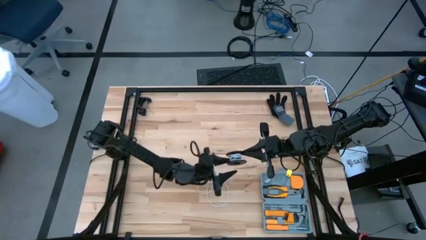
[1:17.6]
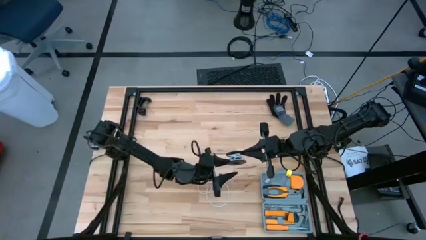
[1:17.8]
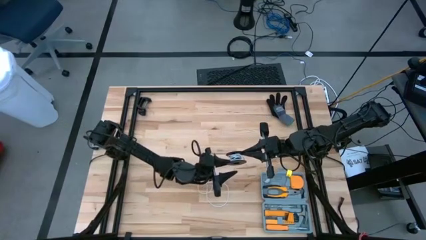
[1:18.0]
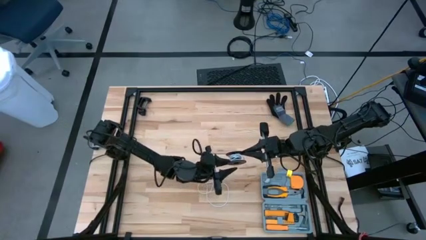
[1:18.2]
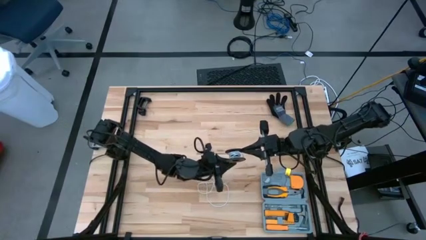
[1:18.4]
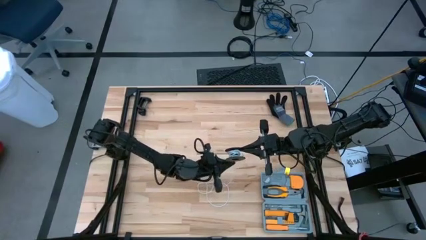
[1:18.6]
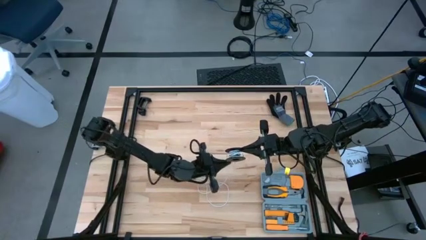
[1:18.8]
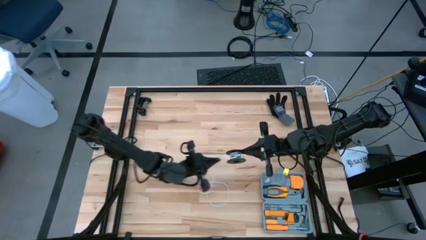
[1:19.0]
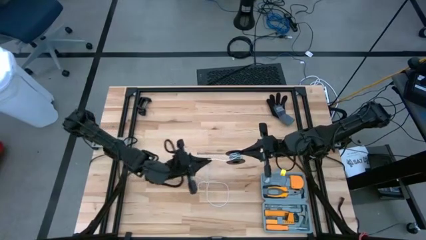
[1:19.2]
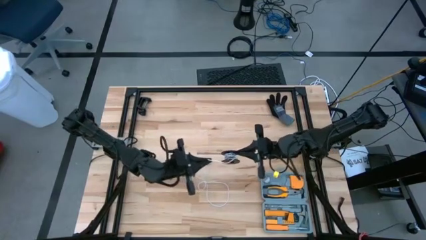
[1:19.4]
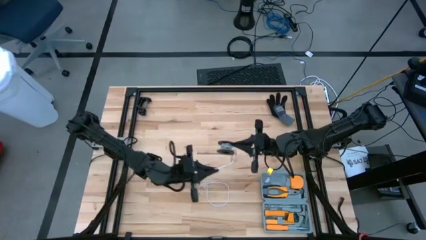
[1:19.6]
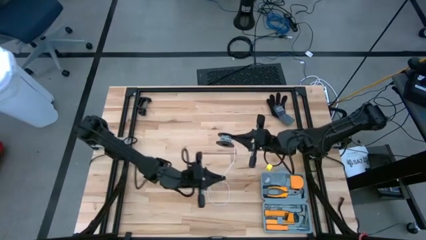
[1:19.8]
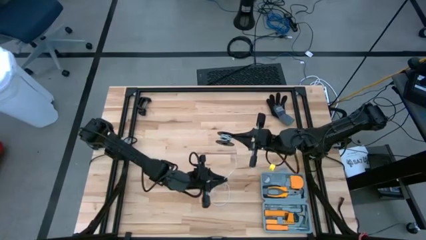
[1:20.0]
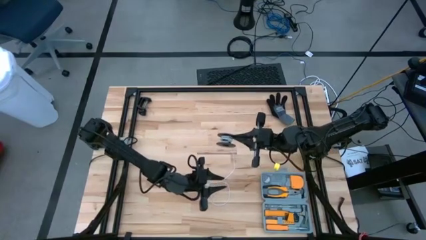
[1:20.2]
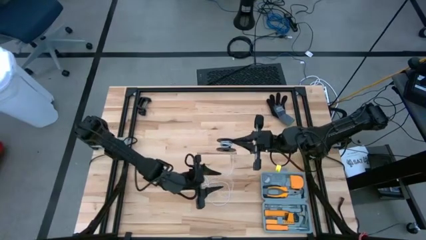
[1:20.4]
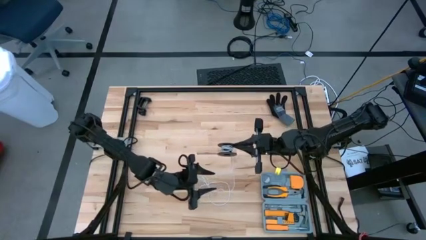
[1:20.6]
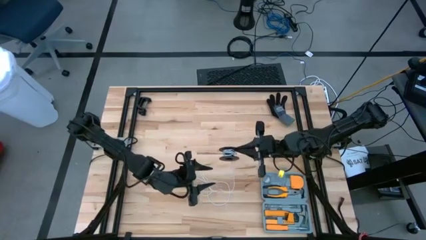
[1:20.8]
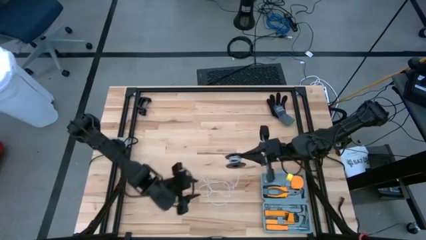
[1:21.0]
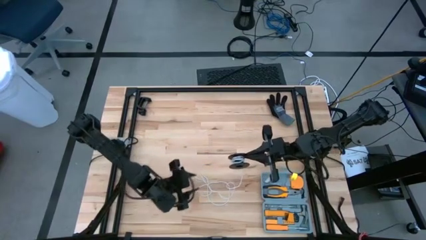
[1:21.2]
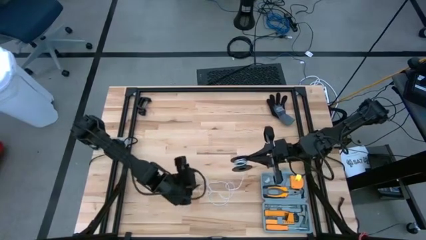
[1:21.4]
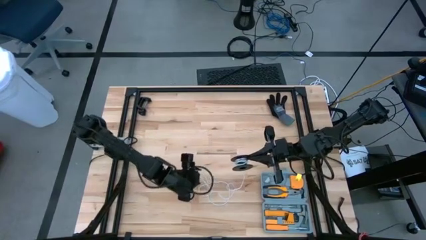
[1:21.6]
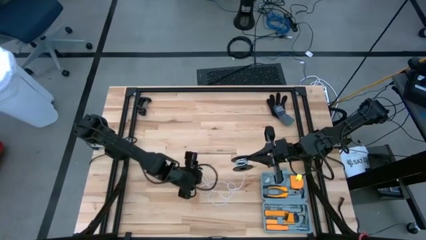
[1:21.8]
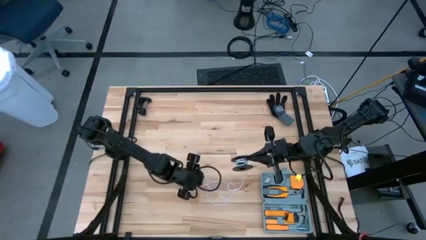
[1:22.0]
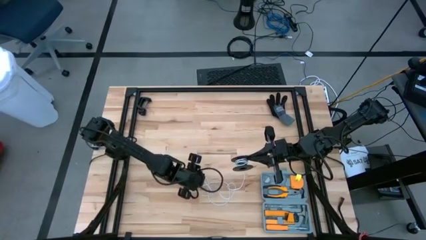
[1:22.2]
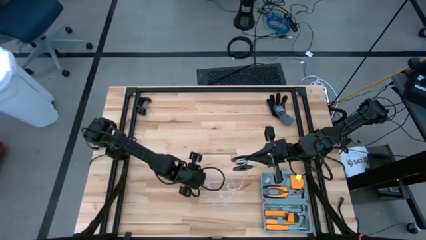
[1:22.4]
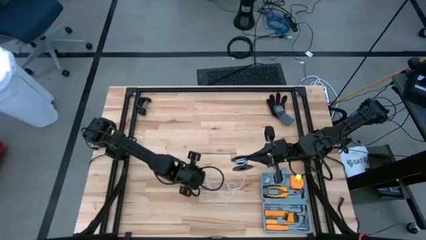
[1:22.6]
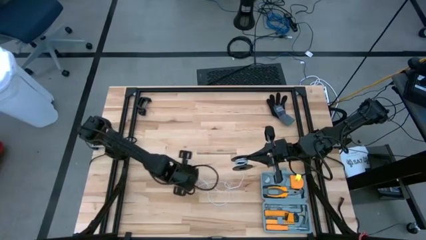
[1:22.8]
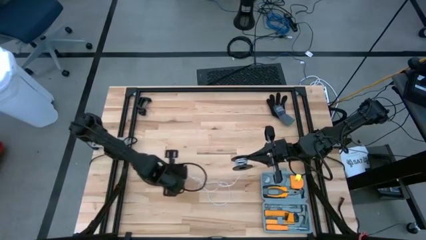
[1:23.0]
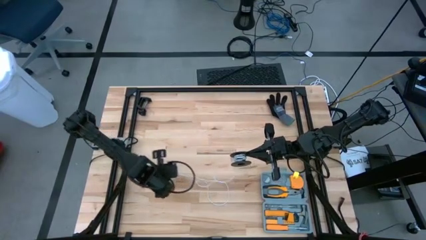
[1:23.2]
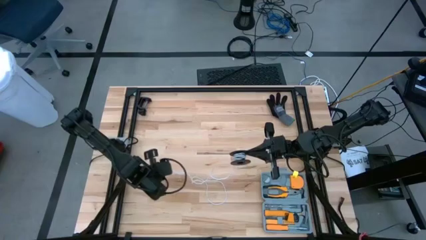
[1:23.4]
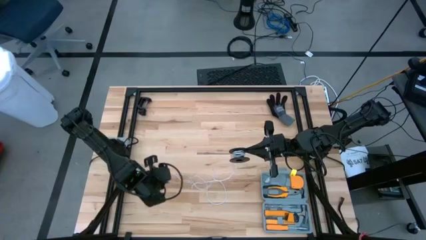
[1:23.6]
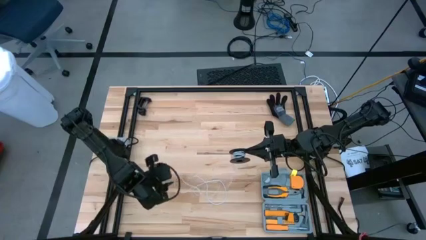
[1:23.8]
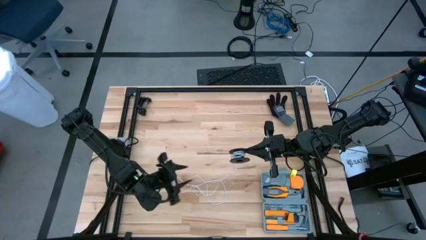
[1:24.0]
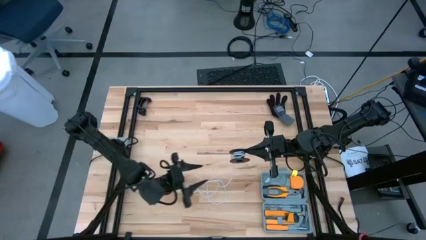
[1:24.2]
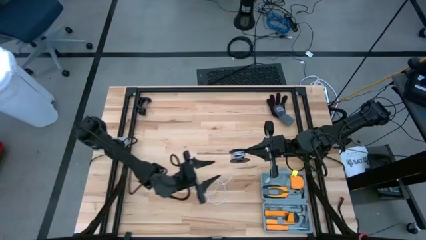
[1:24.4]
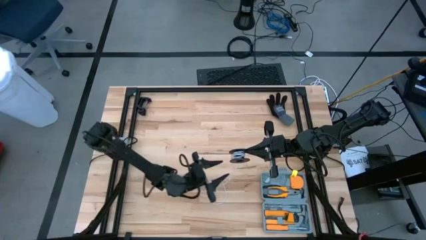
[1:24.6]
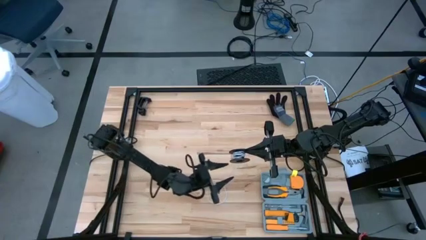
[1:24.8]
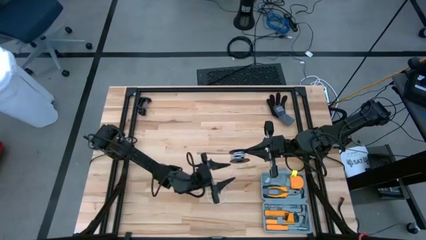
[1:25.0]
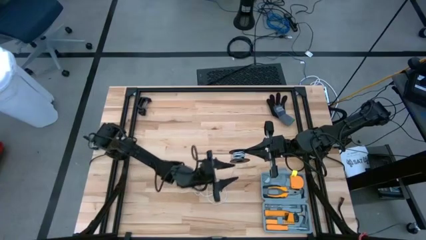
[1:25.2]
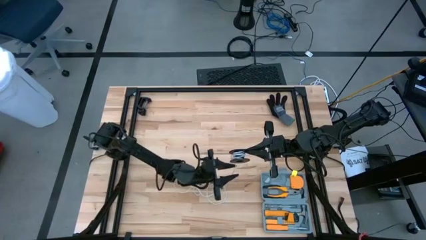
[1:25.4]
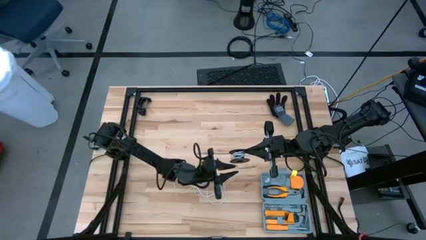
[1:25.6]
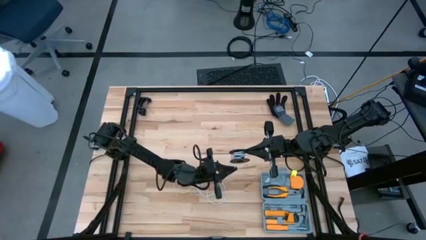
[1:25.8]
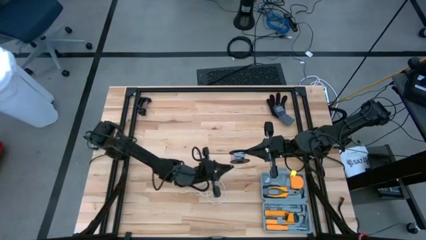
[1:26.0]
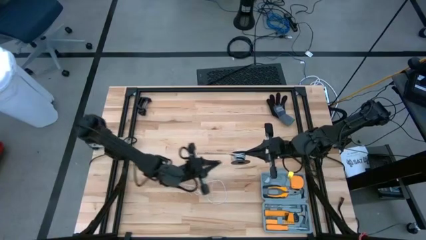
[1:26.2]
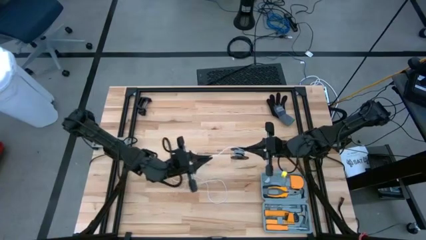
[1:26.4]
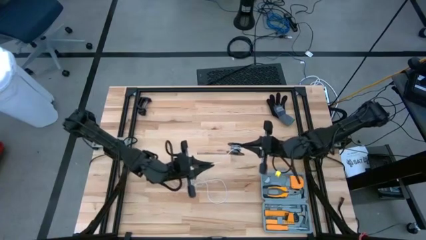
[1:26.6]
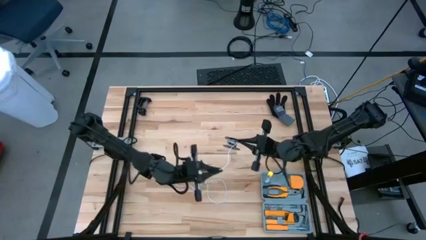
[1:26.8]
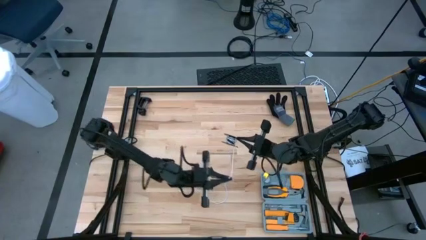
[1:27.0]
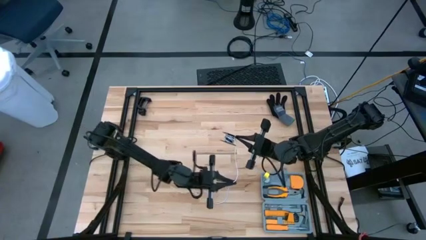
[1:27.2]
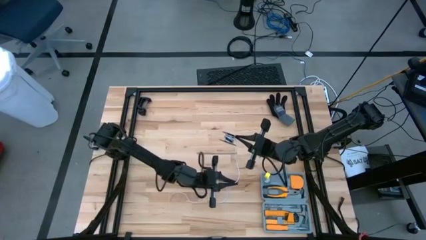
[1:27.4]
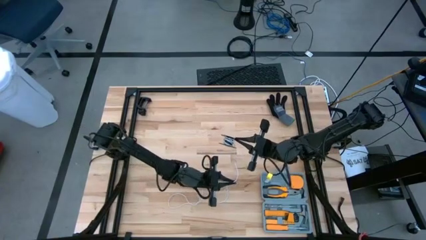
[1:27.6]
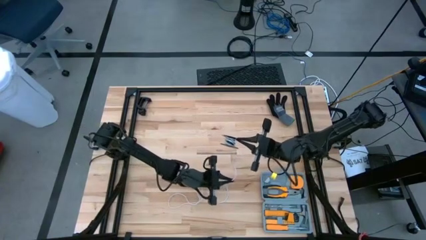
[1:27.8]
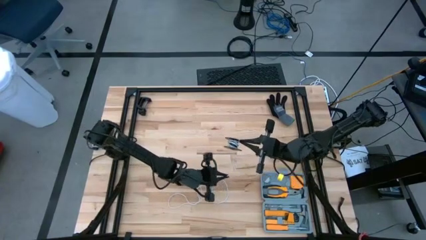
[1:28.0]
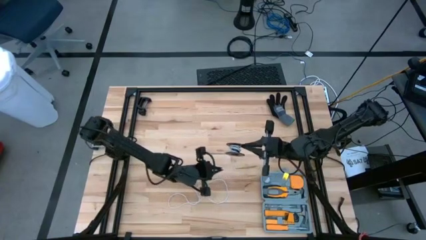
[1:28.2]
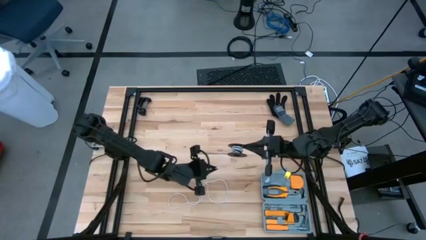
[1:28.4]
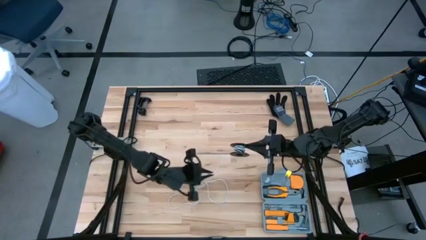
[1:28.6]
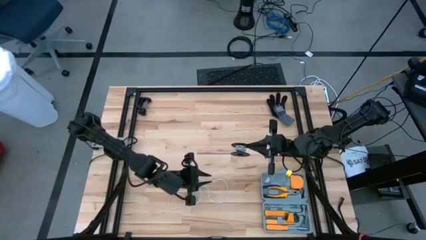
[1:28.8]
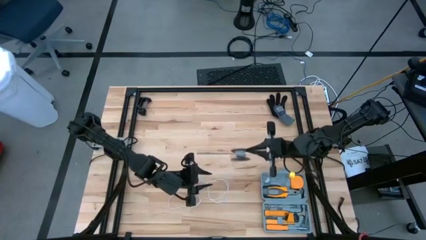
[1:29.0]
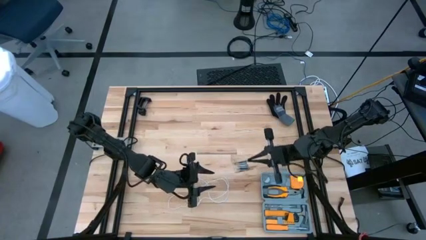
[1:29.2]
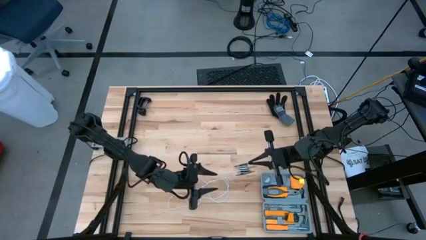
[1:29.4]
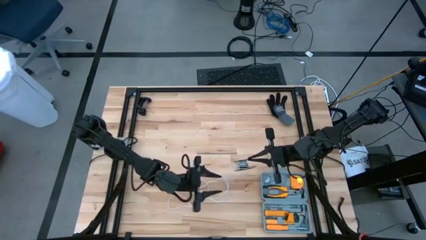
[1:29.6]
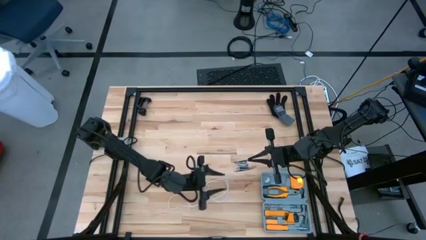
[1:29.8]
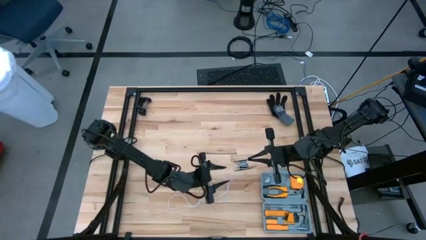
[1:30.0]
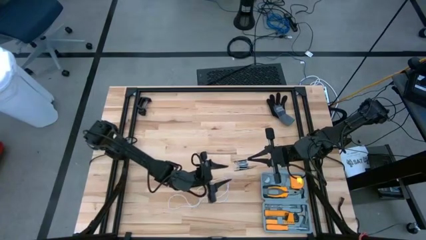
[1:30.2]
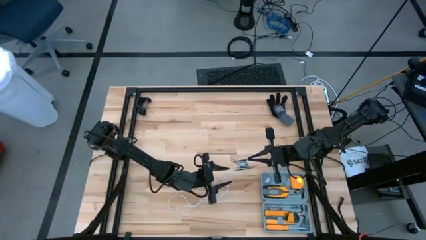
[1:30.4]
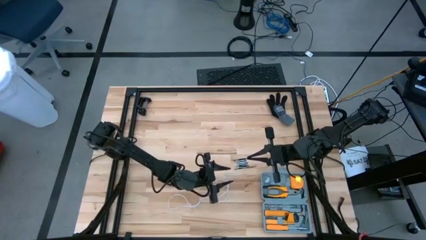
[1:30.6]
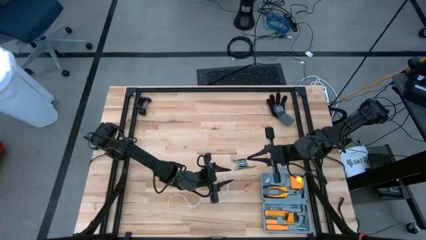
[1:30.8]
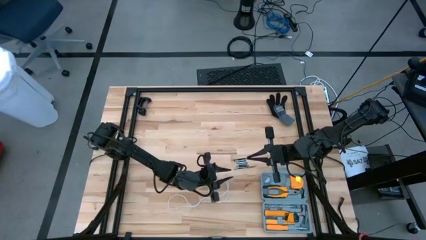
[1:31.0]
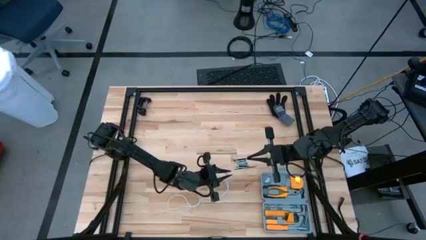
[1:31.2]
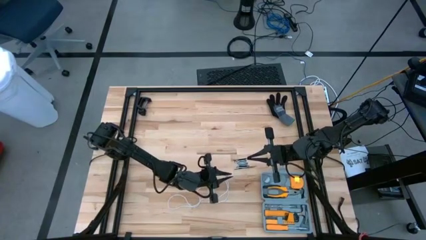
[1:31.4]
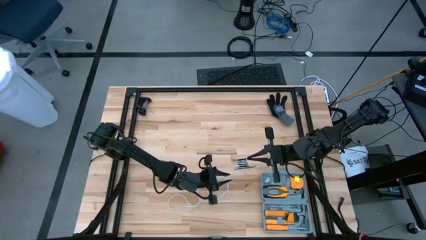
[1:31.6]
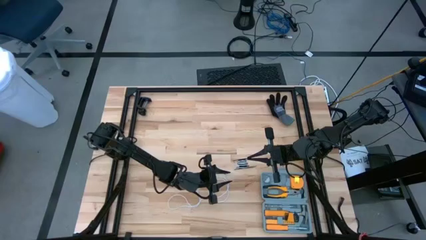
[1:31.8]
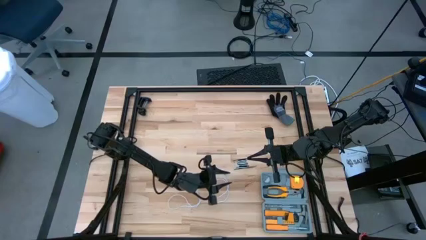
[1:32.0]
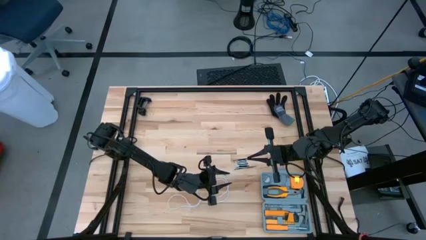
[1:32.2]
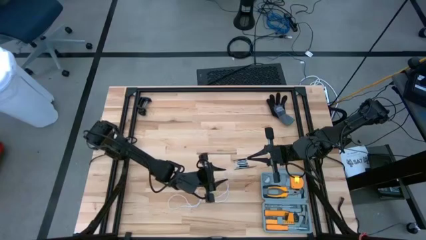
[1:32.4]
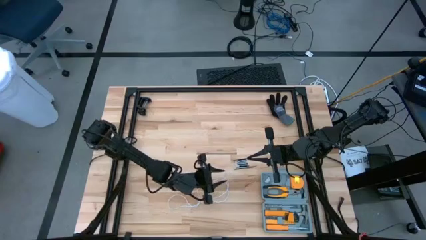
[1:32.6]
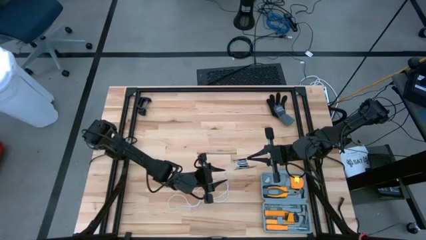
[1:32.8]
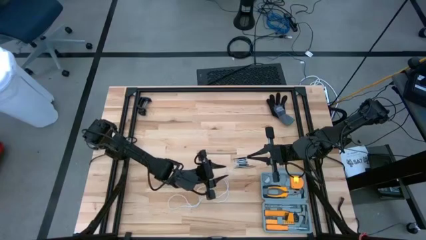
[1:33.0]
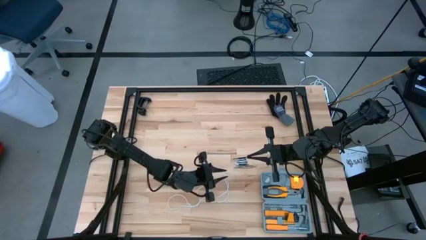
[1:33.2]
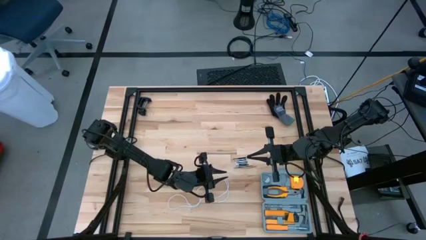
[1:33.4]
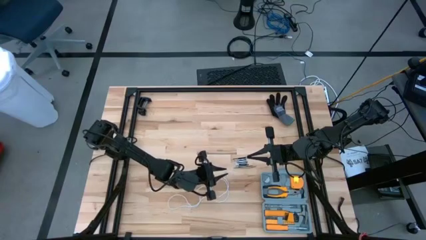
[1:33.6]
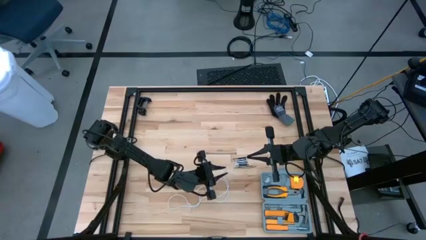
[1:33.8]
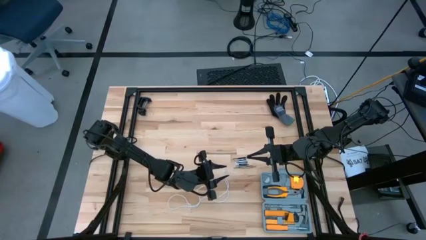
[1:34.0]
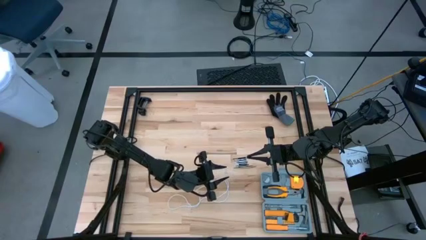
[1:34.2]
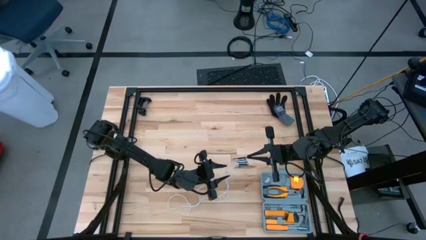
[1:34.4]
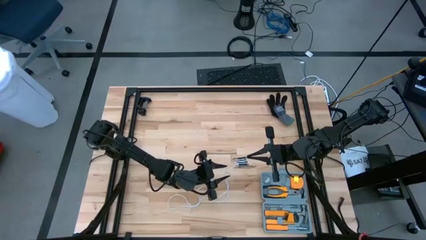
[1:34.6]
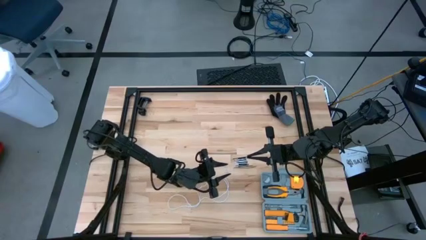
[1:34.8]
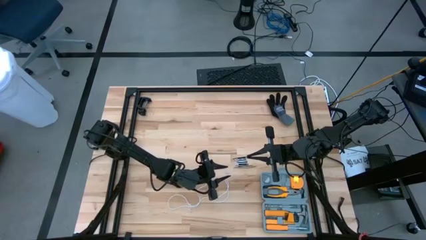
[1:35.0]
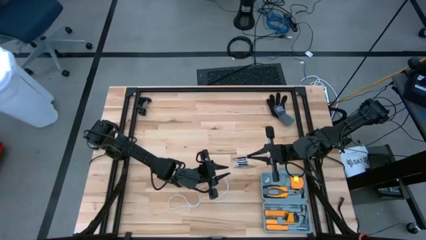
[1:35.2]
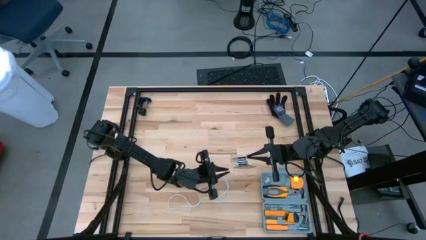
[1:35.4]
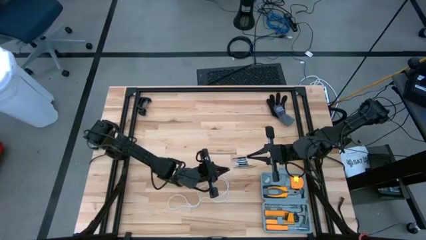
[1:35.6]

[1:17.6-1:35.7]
Task: Coil cords
Uncoil the white cable wire from the spool
